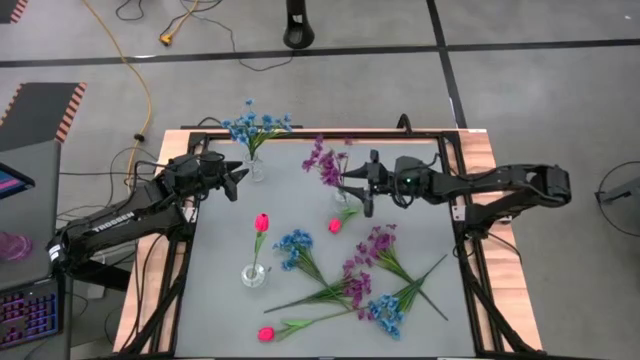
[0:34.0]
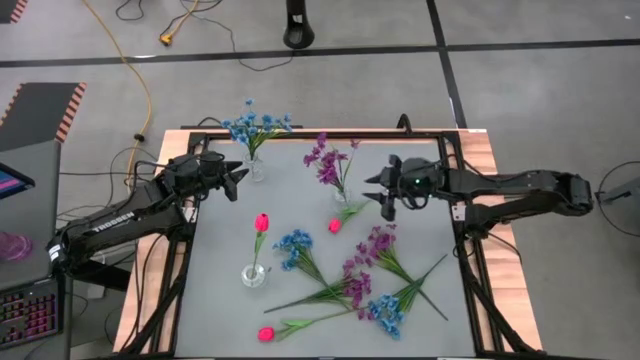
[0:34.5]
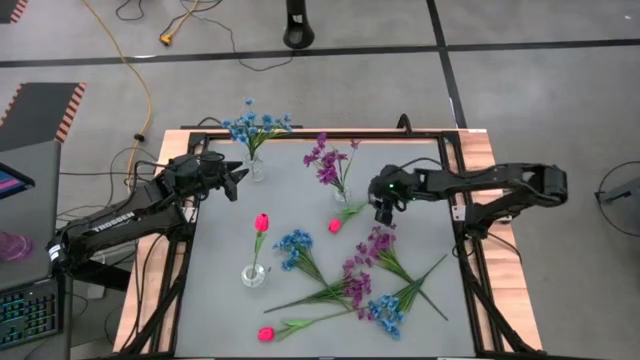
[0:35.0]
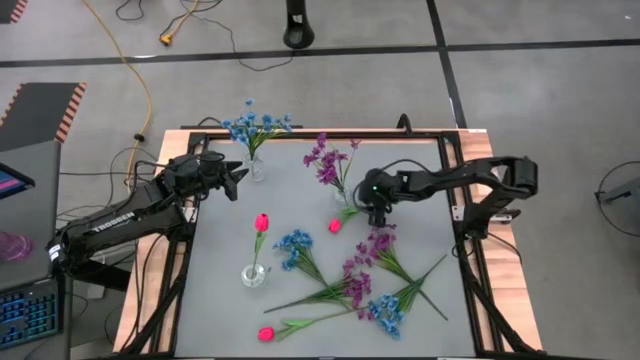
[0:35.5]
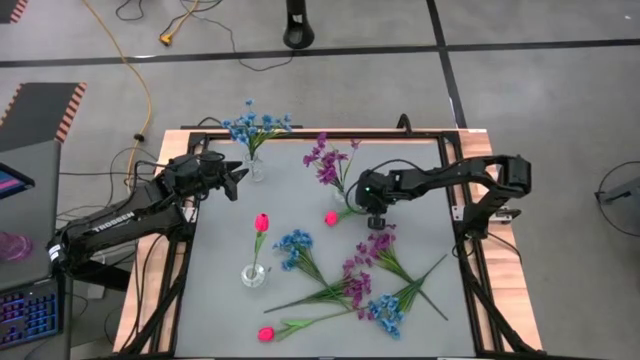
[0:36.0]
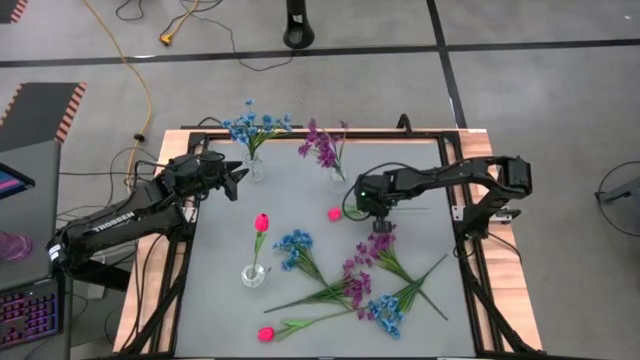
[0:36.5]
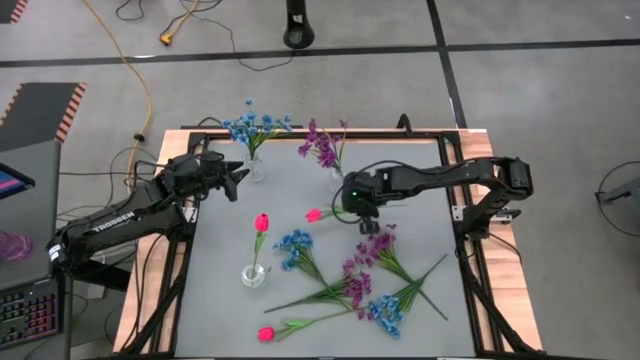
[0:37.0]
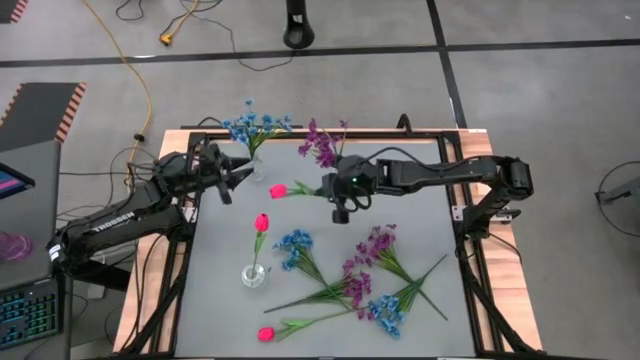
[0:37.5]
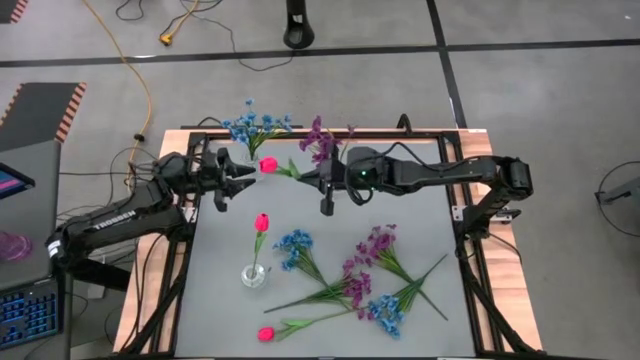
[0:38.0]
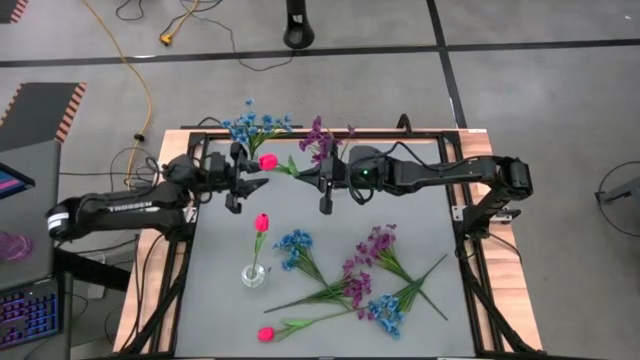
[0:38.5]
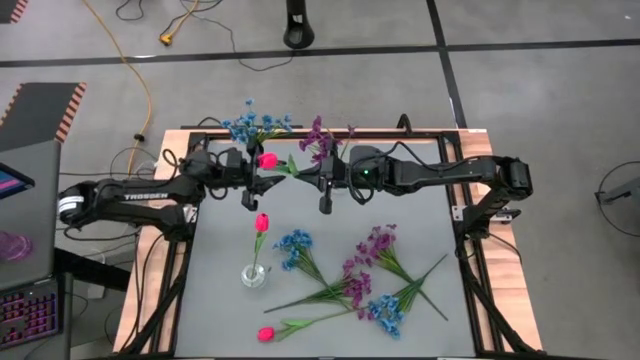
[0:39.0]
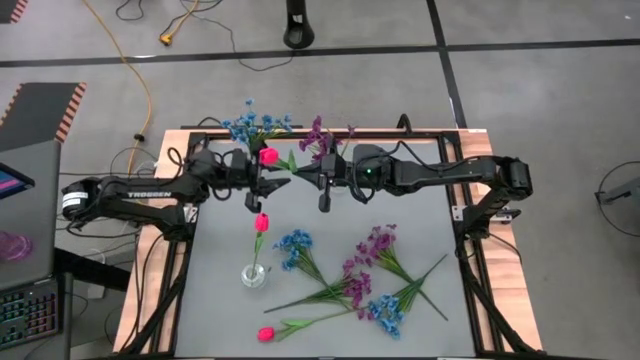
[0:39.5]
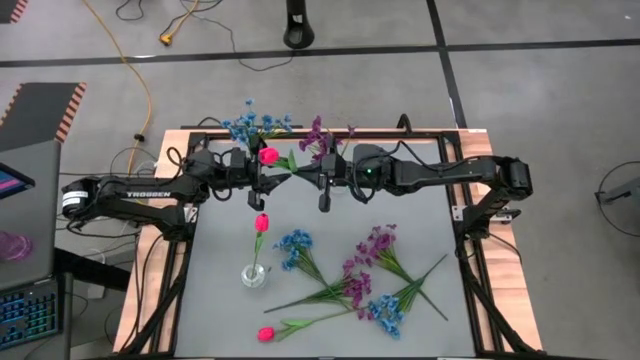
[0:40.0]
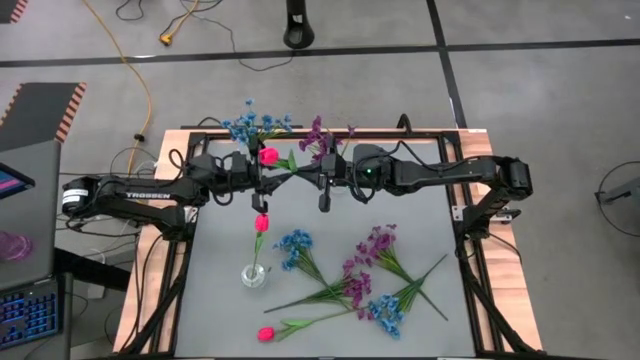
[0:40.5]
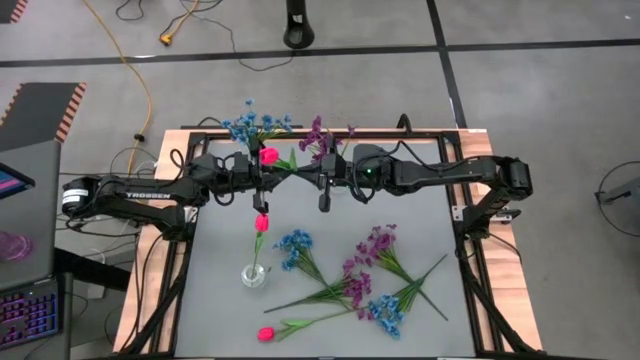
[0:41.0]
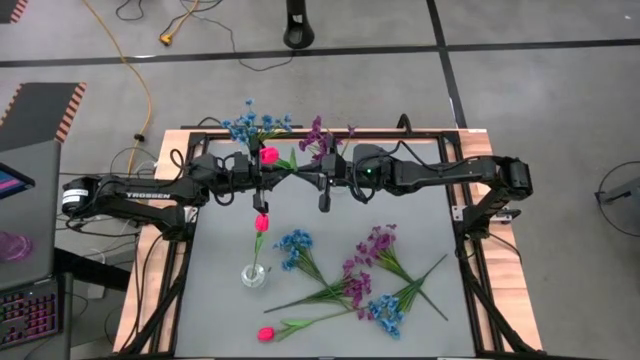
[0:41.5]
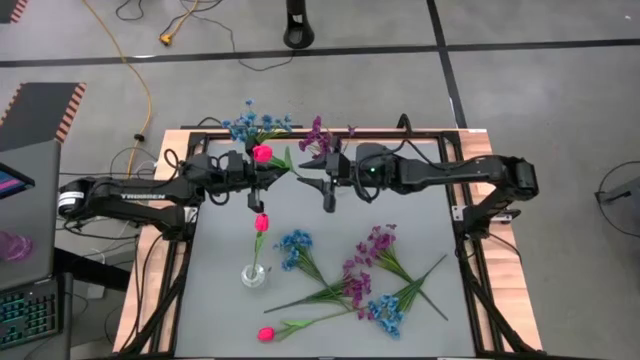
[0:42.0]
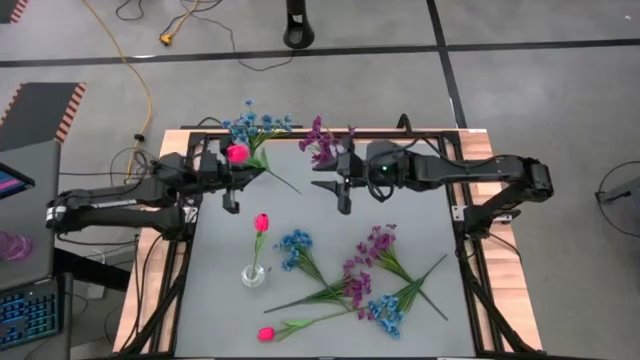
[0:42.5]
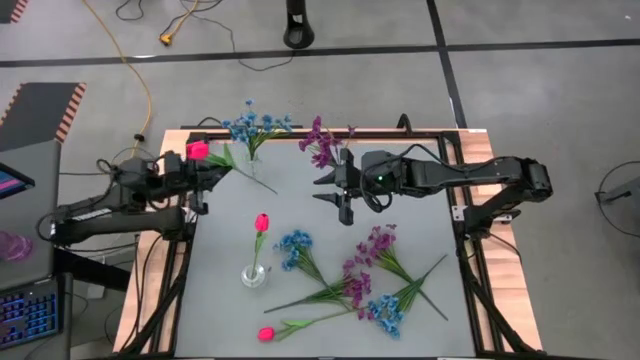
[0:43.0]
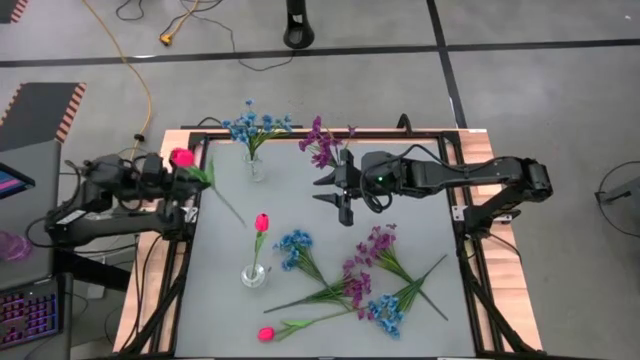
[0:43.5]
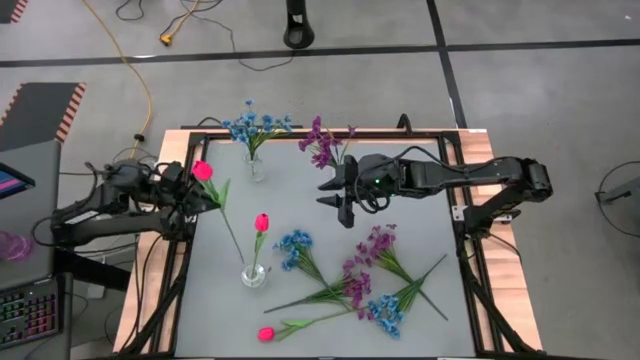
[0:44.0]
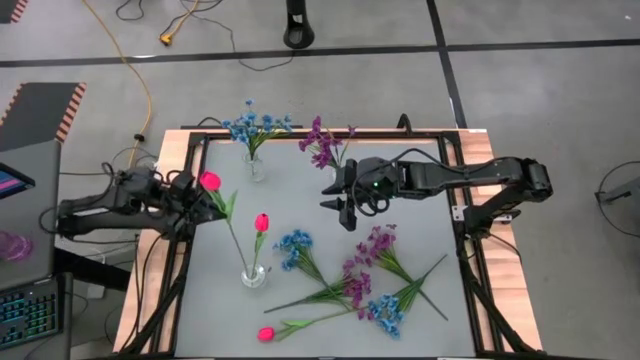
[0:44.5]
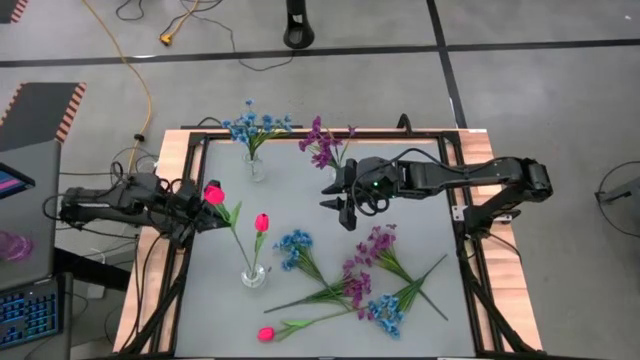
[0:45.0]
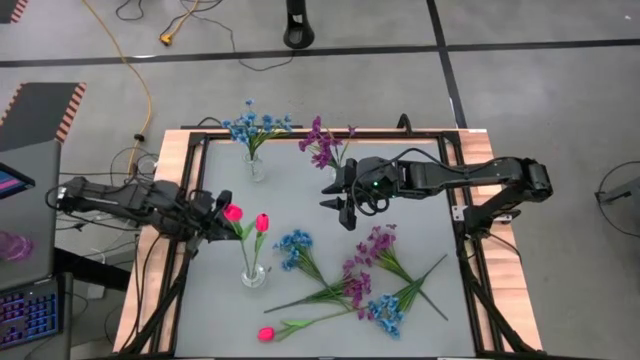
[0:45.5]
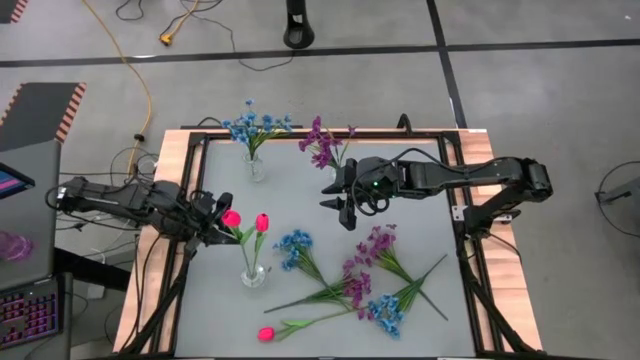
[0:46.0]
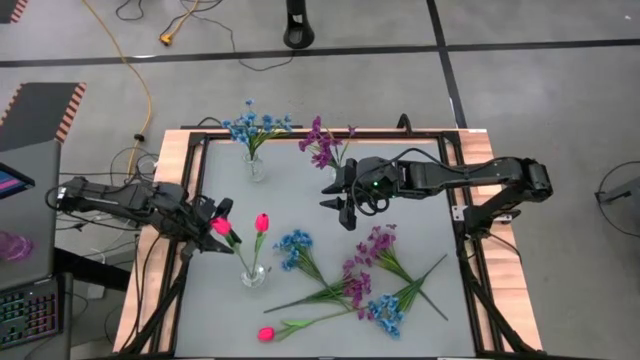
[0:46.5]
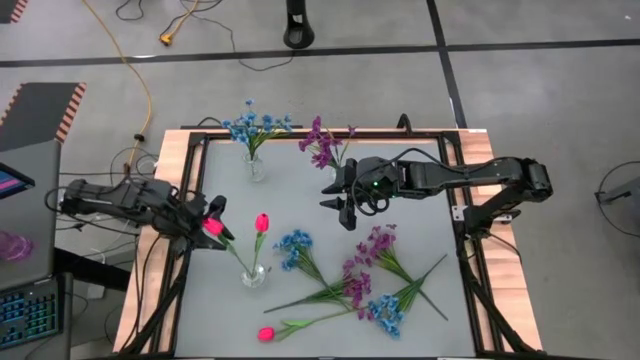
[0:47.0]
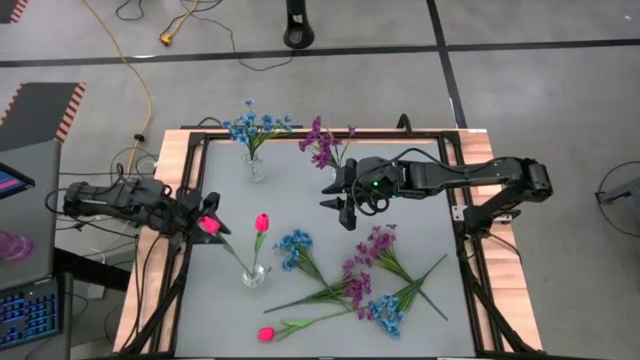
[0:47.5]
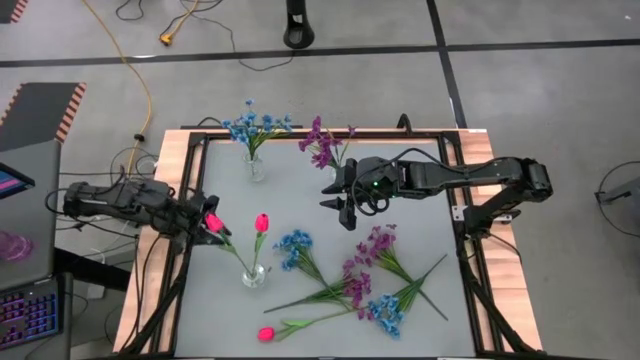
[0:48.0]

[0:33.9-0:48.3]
Task: Sort flowers into vase by color
Put the top red flower into the bottom transparent vase

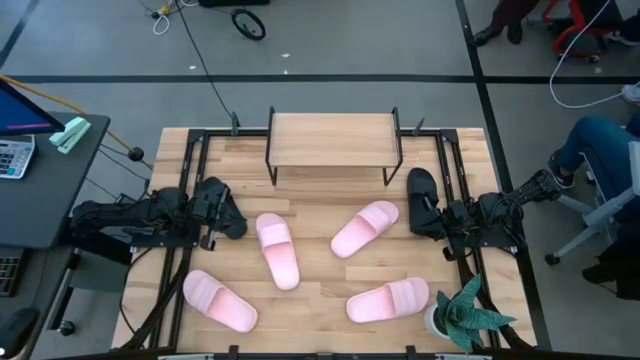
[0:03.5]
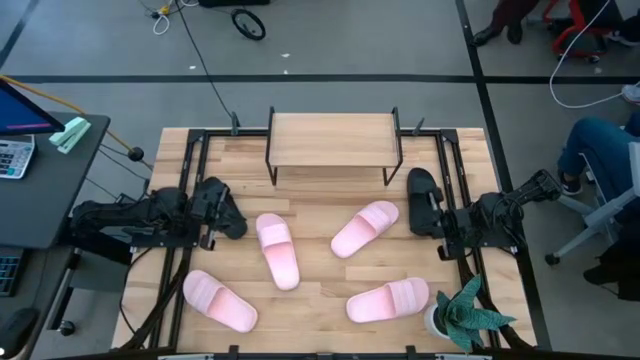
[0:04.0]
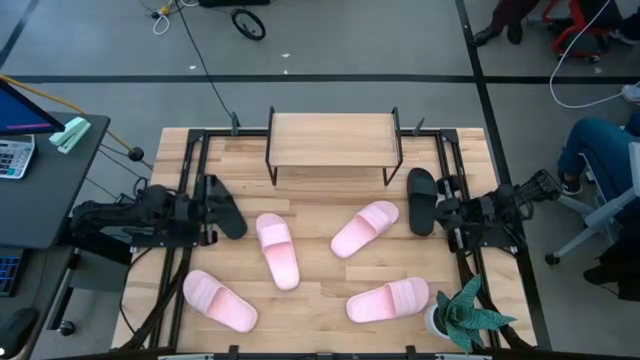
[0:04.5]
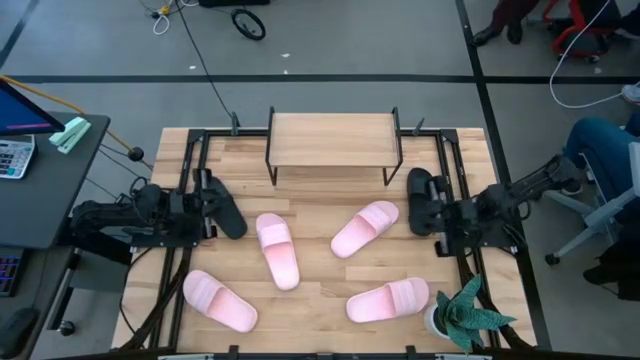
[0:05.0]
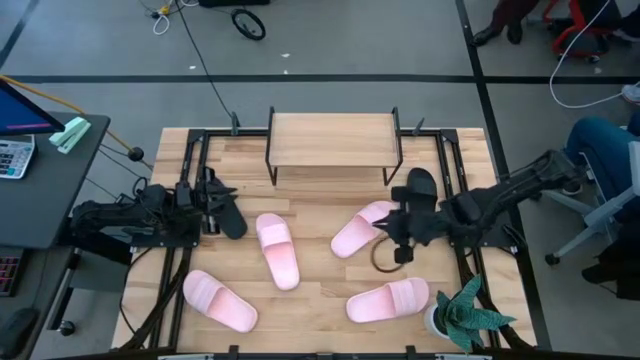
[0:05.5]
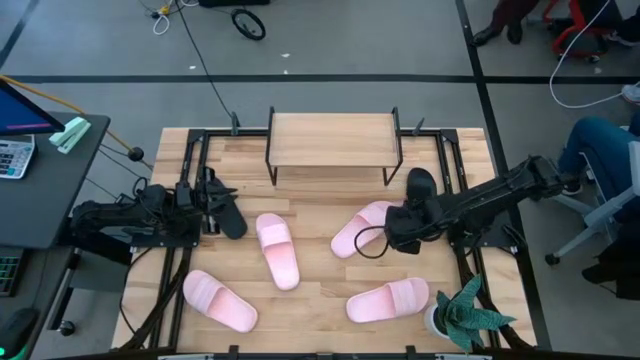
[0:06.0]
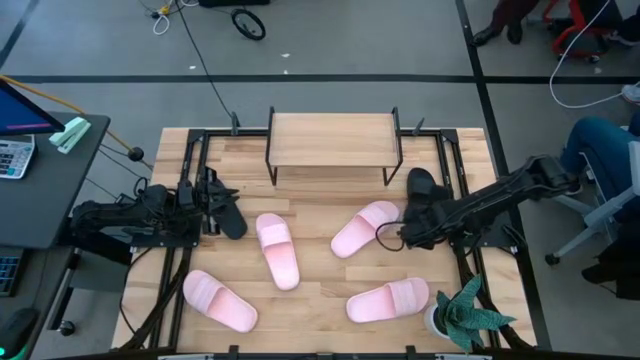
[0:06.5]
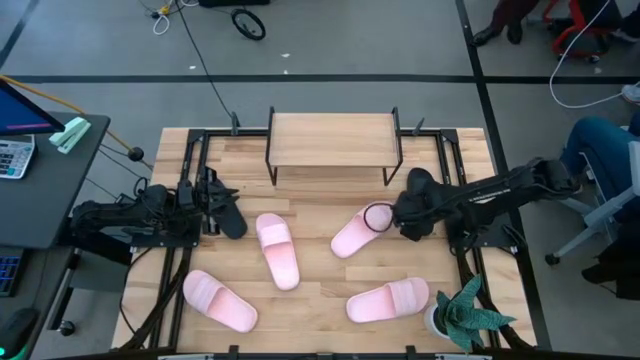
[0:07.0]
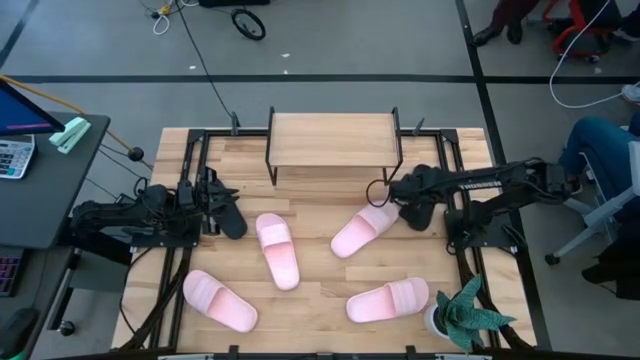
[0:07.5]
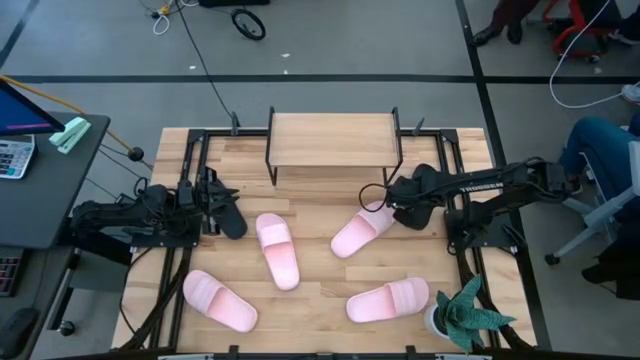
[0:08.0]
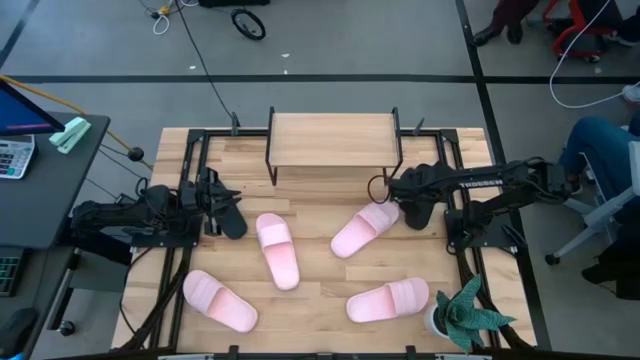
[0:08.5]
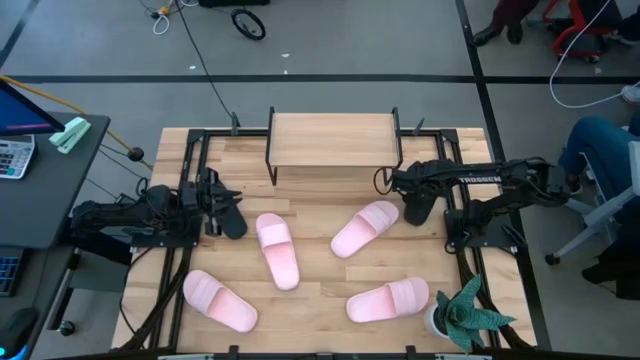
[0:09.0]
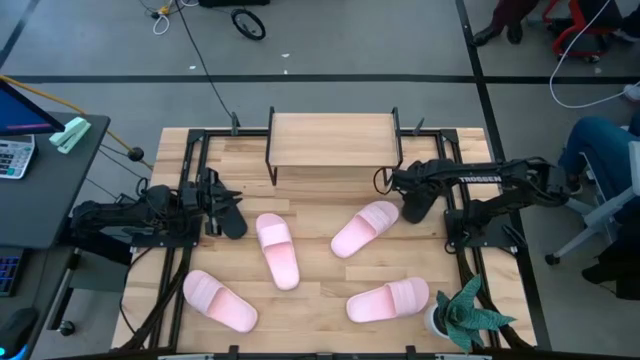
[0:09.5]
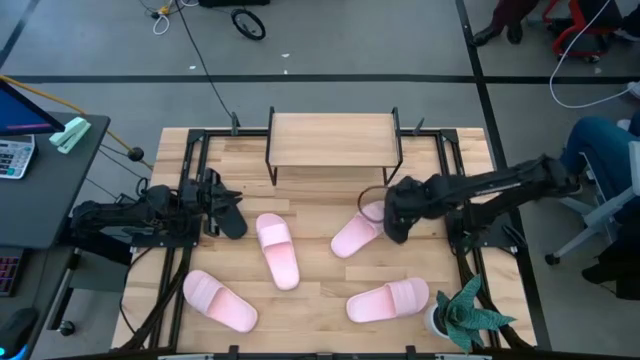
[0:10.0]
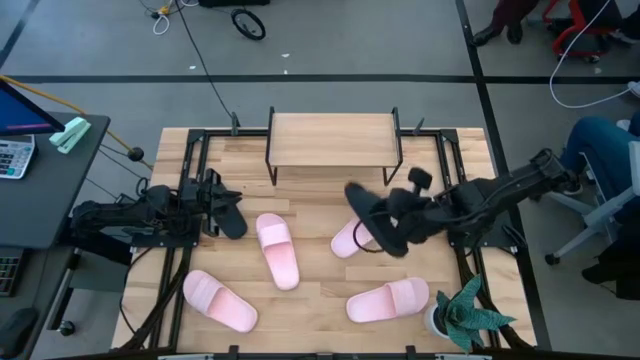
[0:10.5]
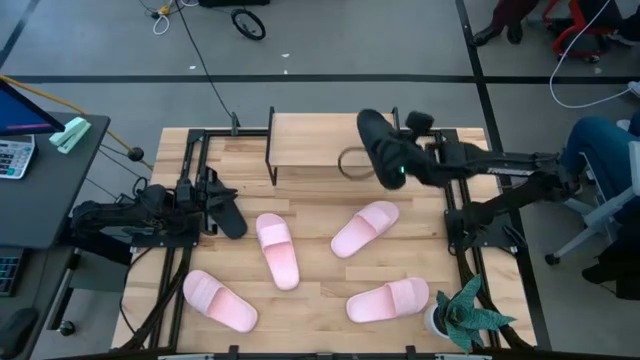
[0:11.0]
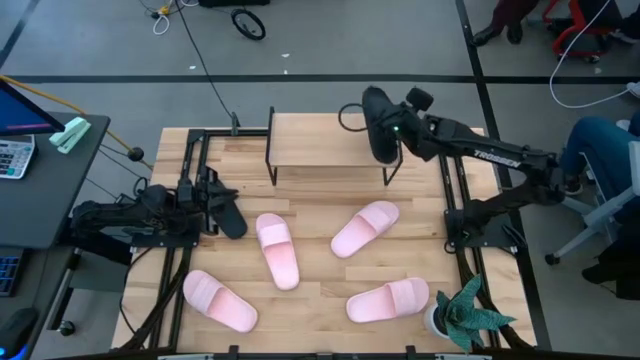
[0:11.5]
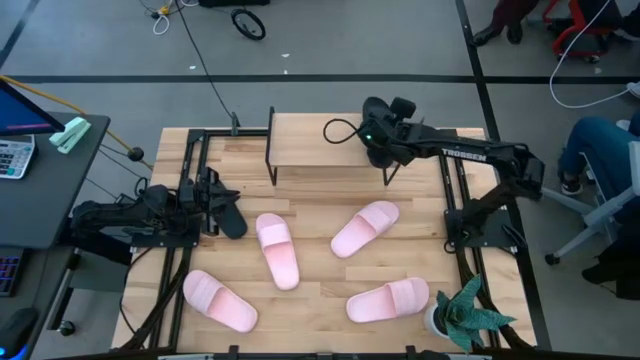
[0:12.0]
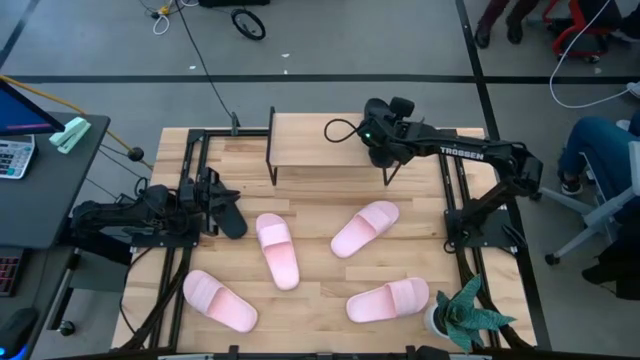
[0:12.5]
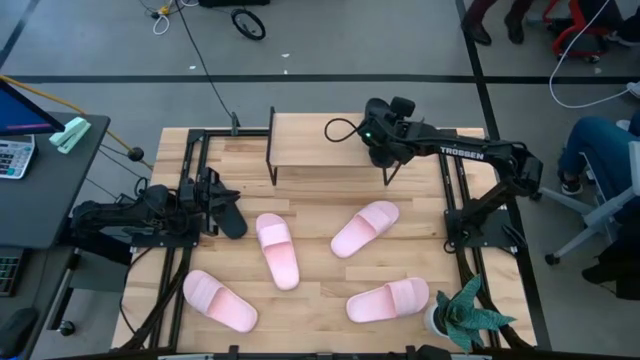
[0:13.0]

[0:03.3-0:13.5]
Task: Pick and place slides into the shelf
Put the right black slide on the shelf
